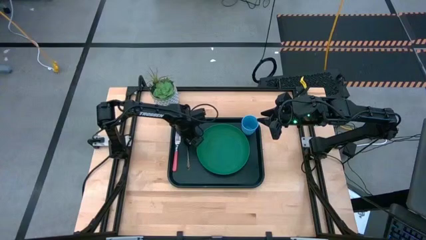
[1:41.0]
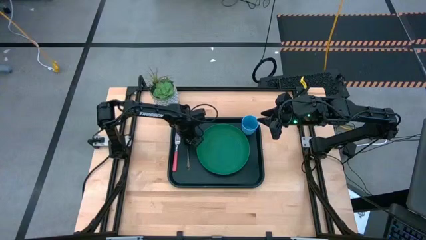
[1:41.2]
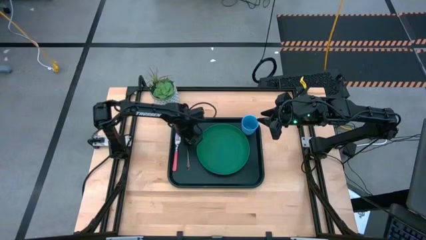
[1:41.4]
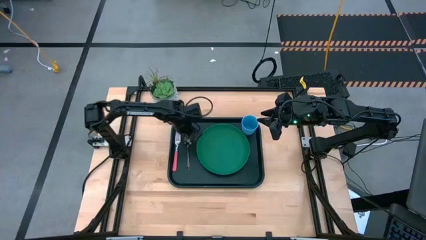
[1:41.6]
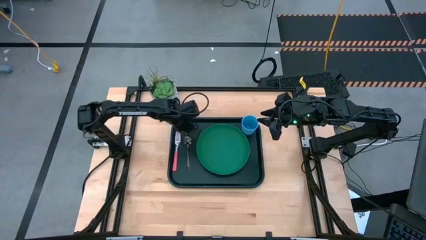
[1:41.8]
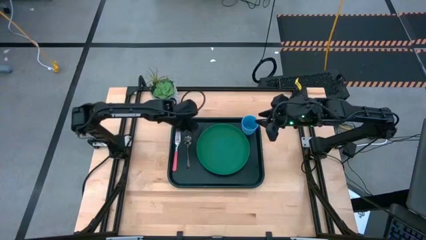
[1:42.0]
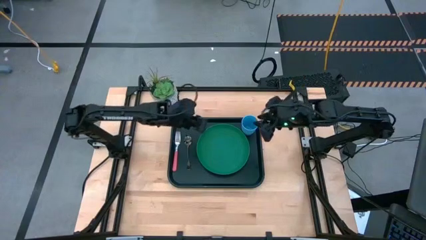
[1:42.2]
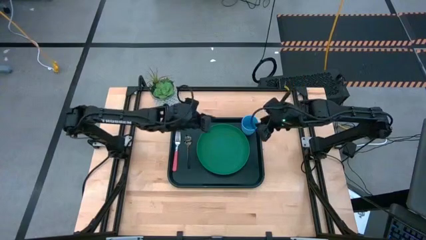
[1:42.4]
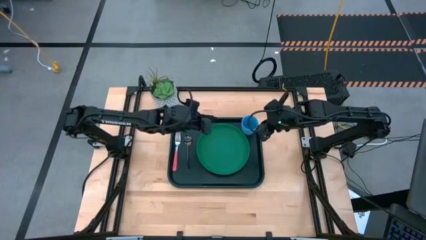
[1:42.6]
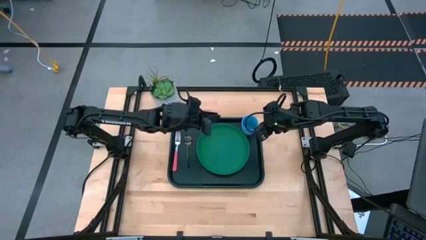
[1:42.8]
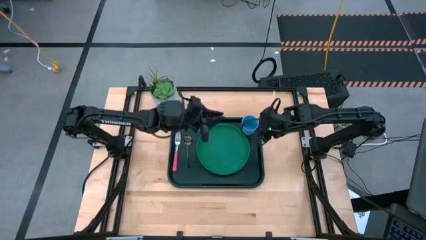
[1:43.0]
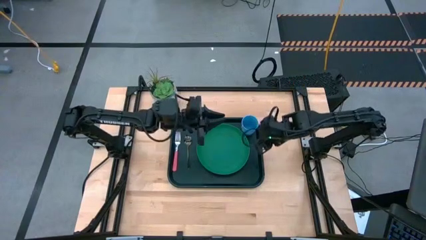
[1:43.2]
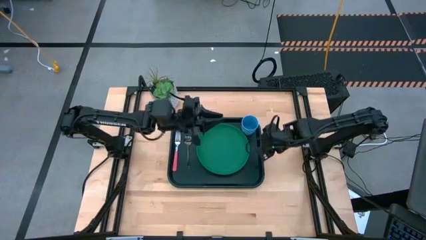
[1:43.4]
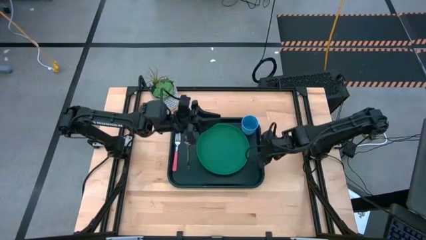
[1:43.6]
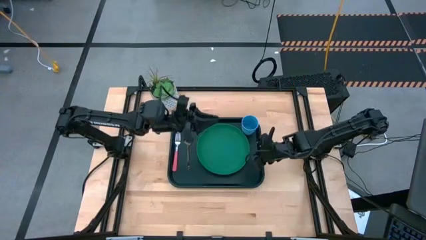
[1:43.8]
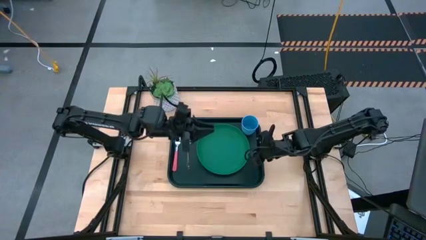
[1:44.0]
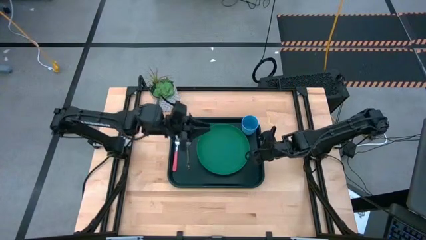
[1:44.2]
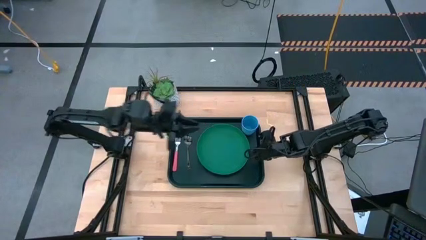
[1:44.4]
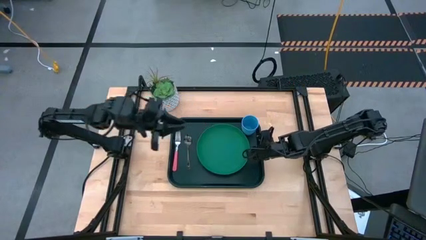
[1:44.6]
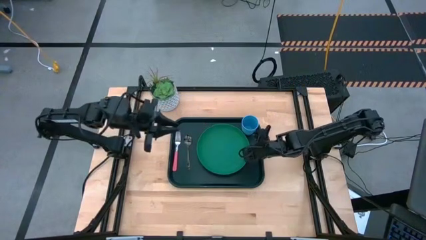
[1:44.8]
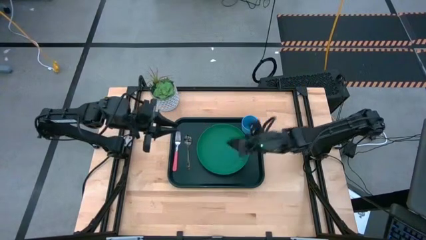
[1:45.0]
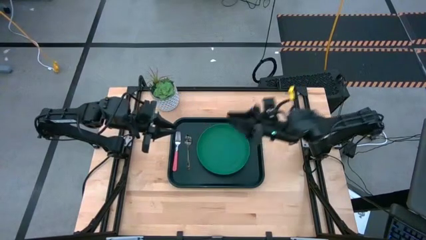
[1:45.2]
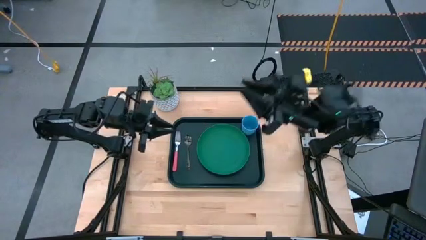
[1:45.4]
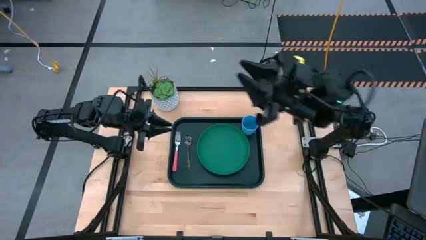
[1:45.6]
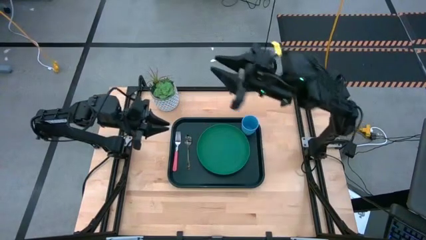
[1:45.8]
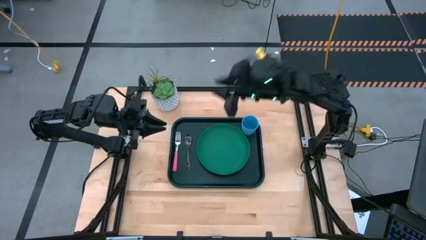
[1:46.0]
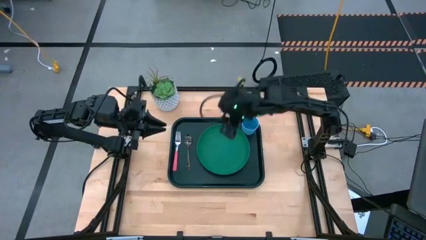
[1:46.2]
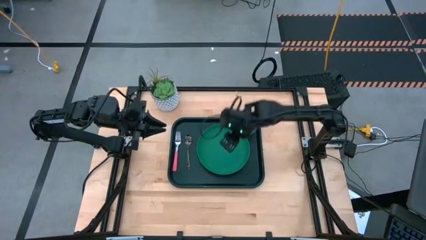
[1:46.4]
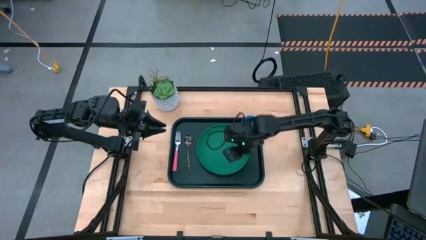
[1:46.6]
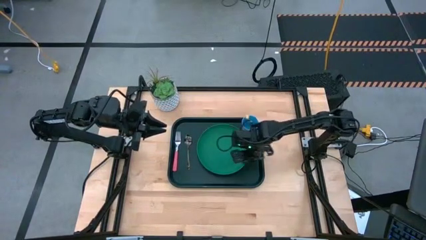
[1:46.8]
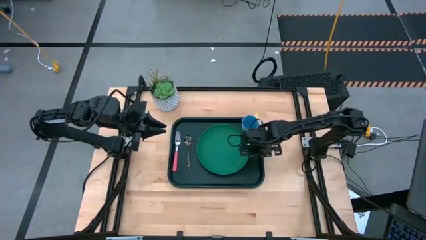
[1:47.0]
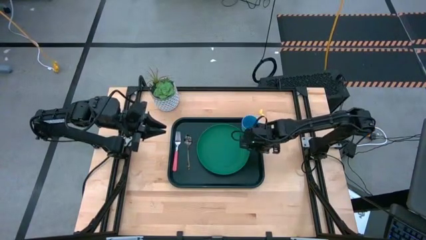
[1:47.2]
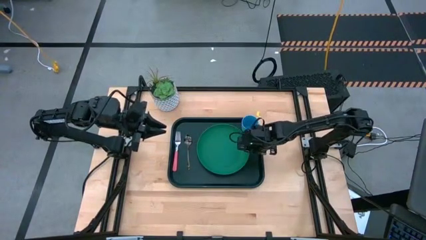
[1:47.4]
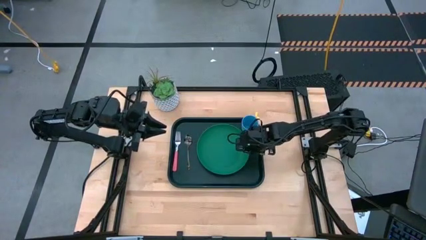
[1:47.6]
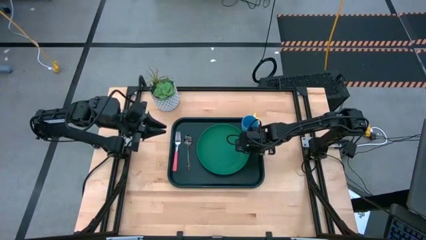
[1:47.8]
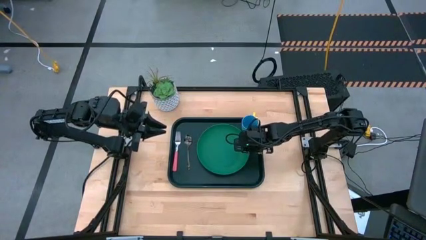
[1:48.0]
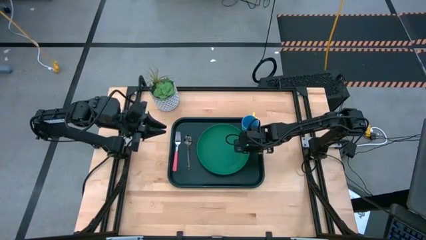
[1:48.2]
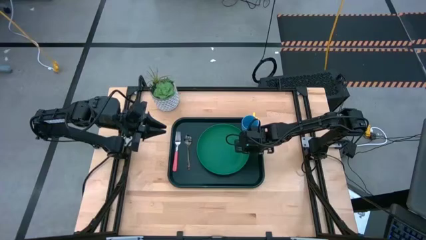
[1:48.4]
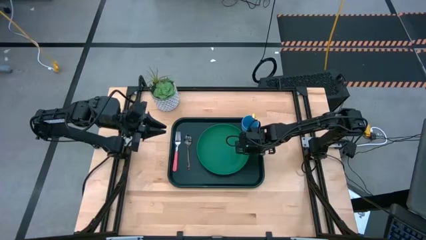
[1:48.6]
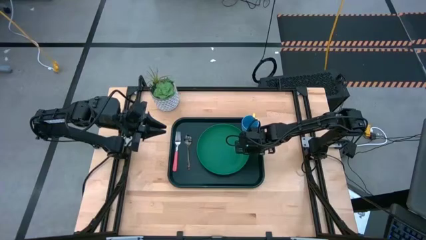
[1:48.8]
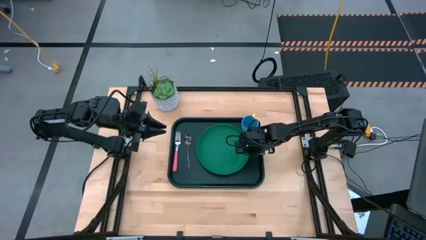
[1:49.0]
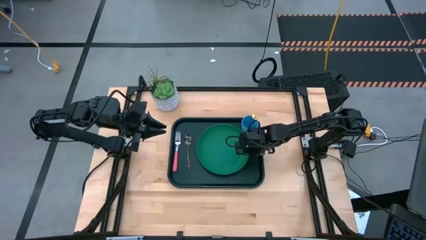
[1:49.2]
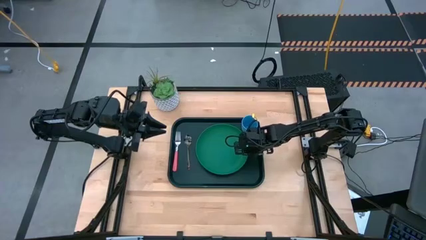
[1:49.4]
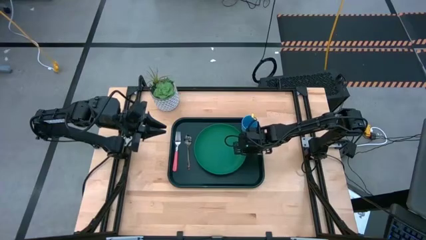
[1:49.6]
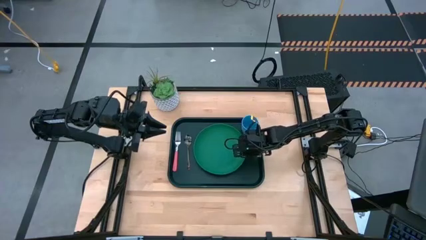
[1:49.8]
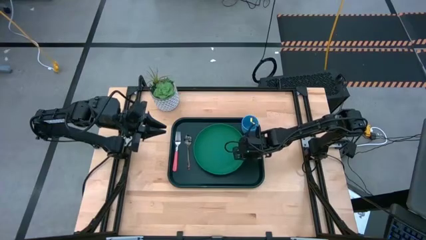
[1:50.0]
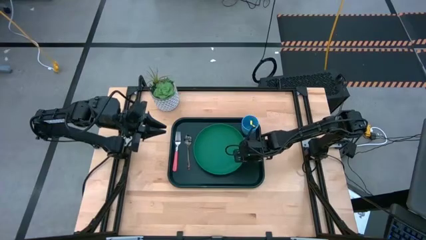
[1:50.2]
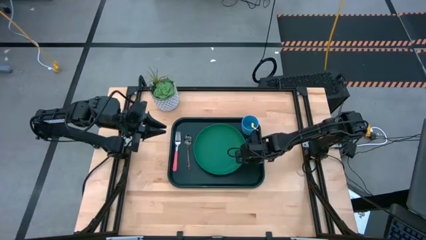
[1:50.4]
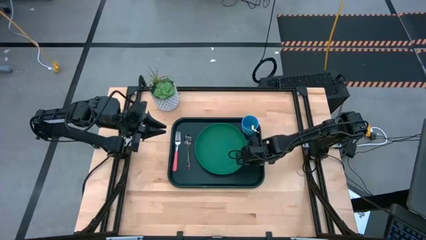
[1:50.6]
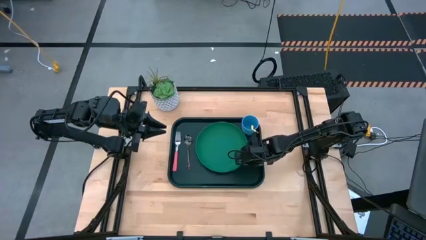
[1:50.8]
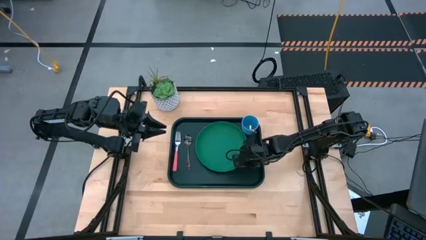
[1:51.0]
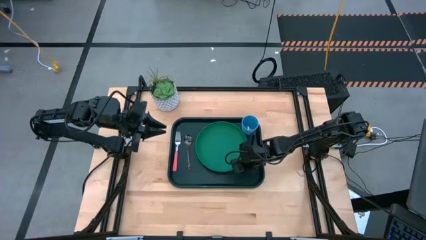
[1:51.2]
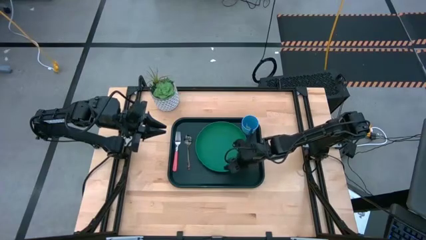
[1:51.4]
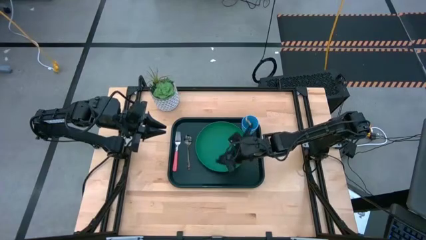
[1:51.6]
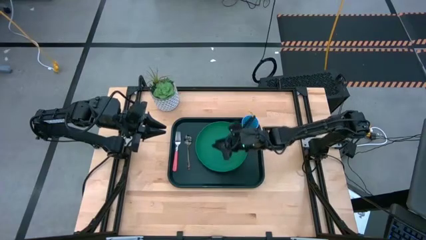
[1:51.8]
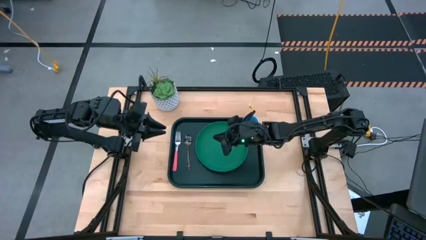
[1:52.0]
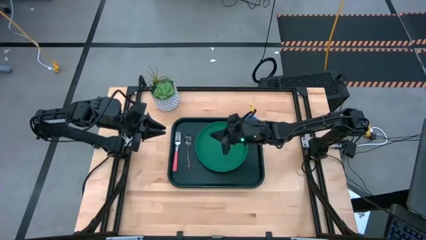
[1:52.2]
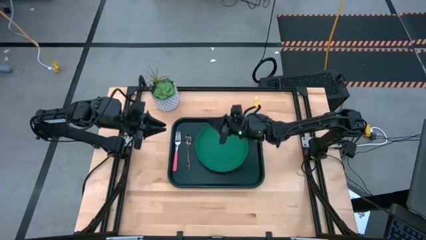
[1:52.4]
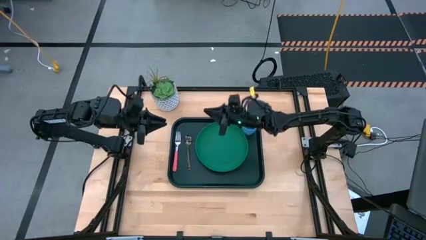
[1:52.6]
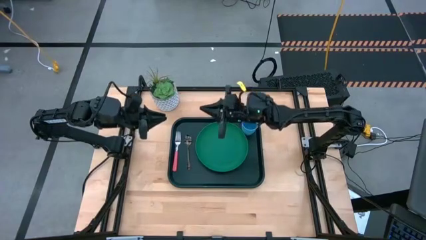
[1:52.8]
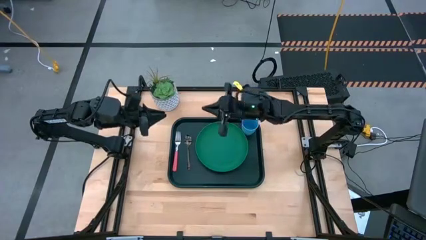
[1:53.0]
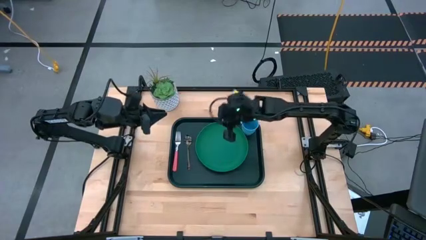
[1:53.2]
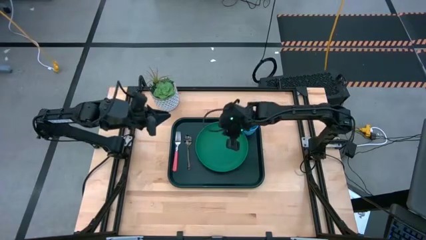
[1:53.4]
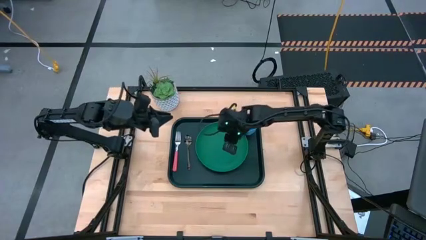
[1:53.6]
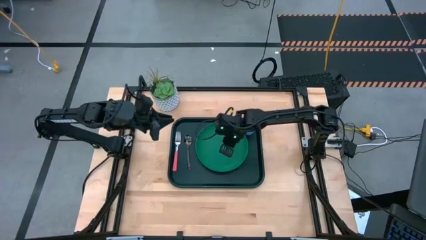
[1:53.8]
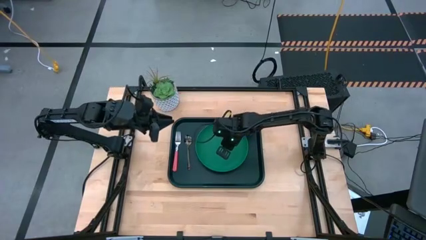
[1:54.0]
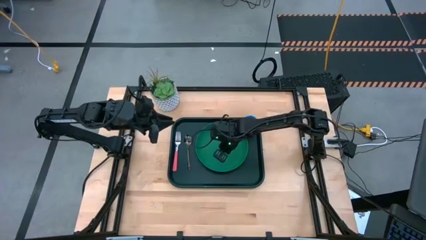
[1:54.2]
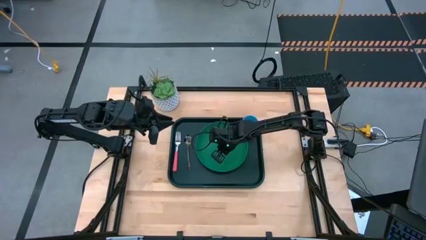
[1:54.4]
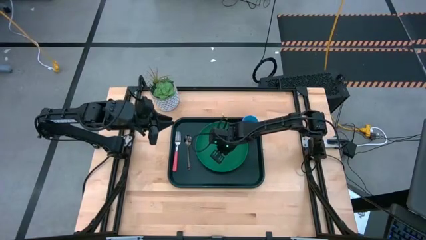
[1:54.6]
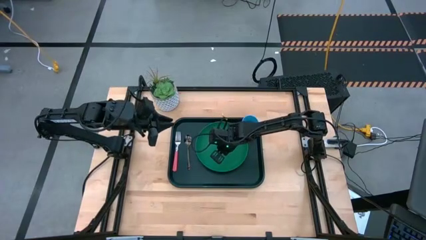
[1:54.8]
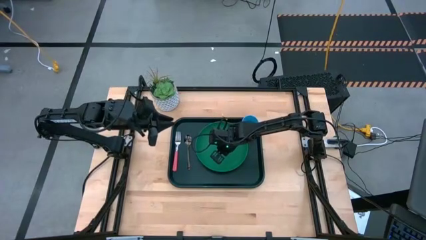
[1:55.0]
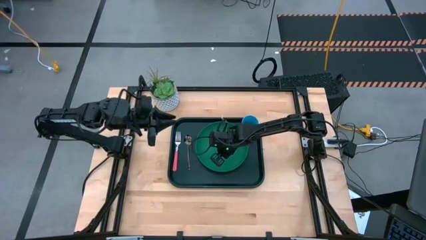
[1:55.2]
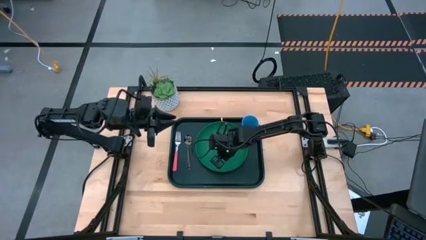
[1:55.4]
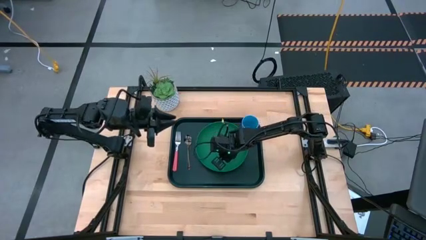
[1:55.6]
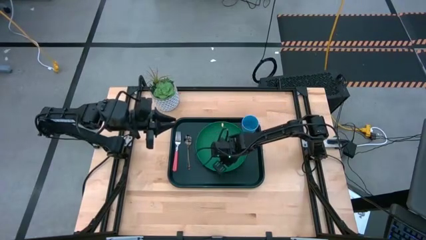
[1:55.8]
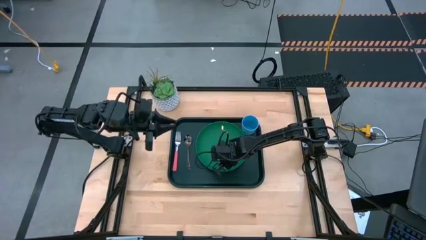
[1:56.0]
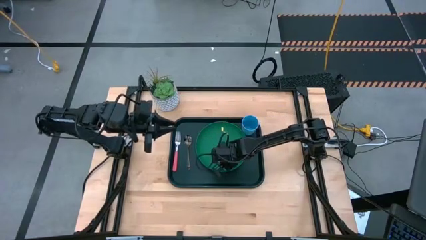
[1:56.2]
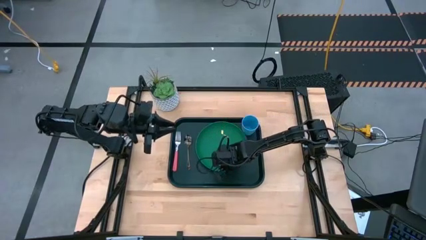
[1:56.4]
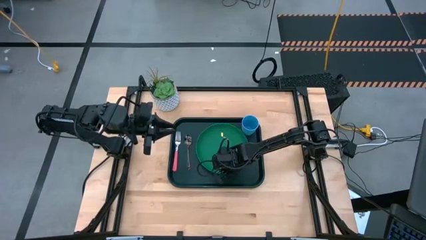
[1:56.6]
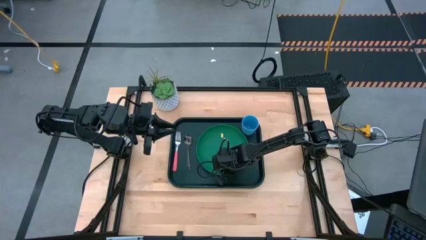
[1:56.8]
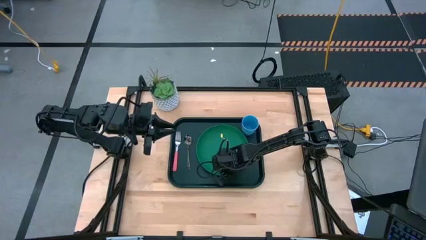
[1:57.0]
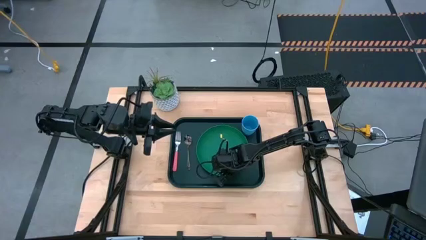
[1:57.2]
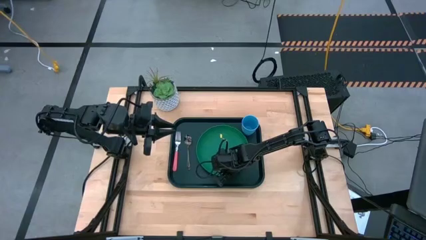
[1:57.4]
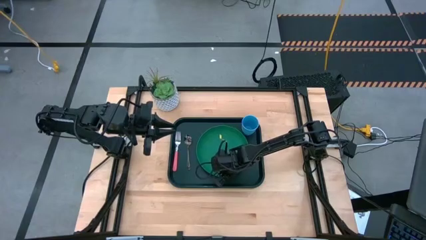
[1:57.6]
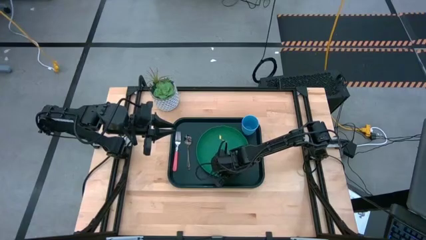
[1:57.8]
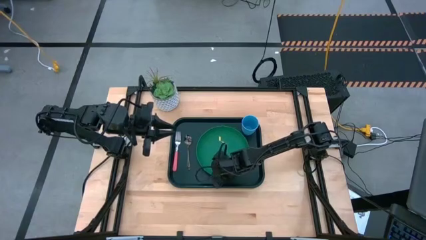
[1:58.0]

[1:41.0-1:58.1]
Task: Pick and place plate/cup/fork/spoon on tray
Adjust the green plate on the dark green serving tray
